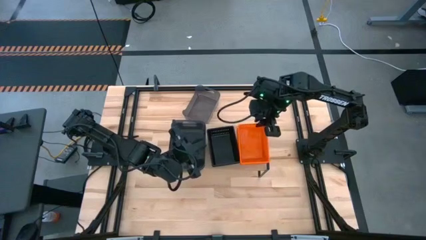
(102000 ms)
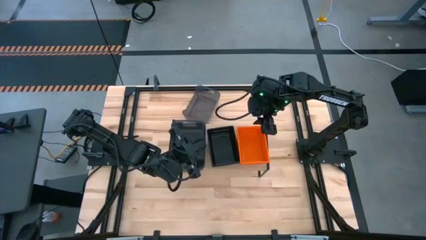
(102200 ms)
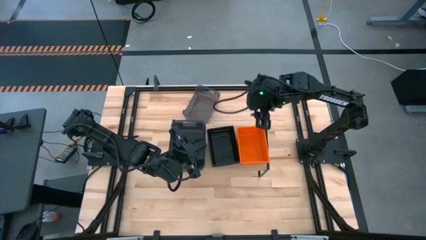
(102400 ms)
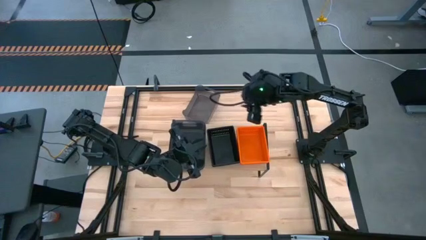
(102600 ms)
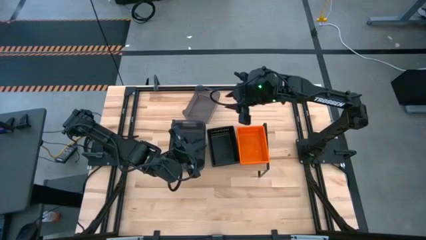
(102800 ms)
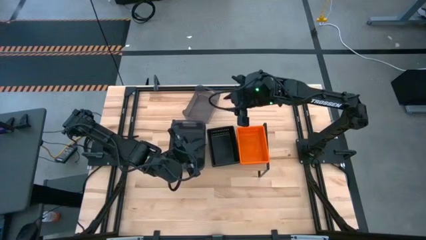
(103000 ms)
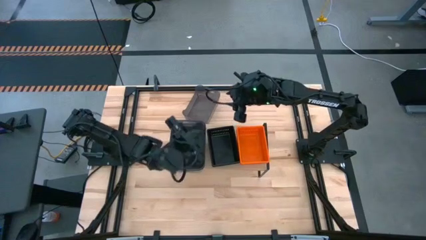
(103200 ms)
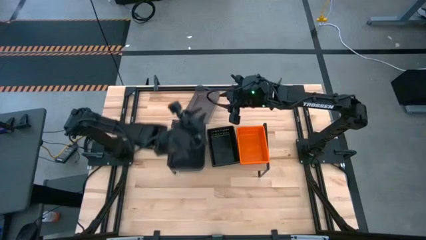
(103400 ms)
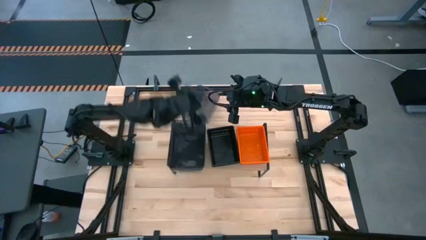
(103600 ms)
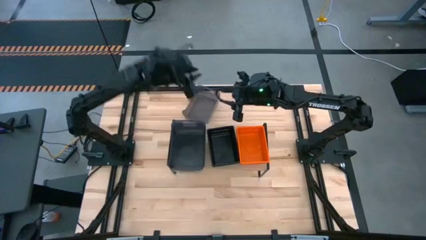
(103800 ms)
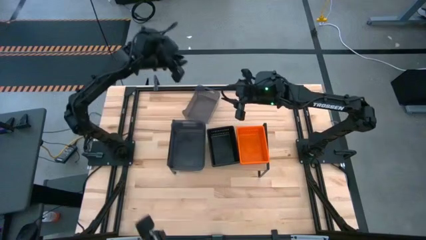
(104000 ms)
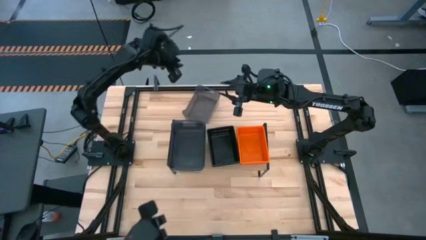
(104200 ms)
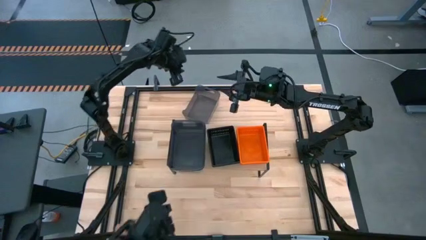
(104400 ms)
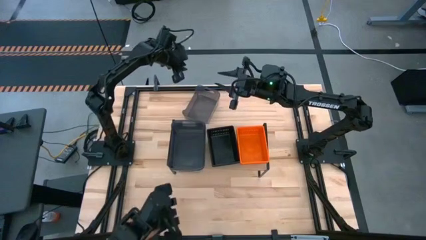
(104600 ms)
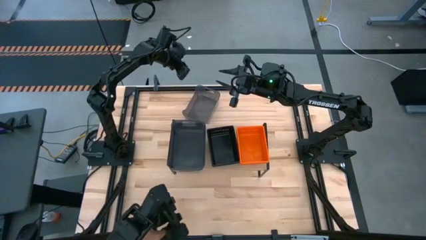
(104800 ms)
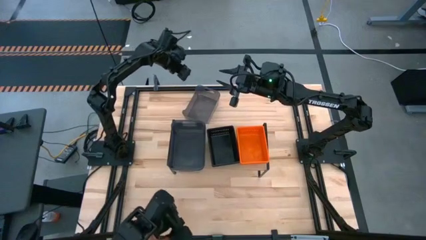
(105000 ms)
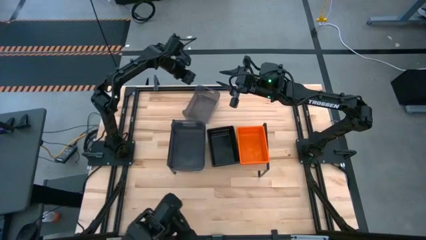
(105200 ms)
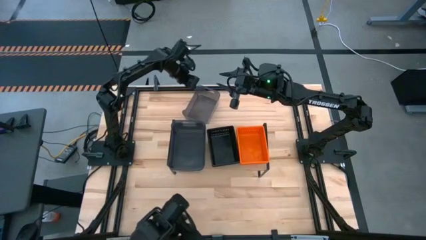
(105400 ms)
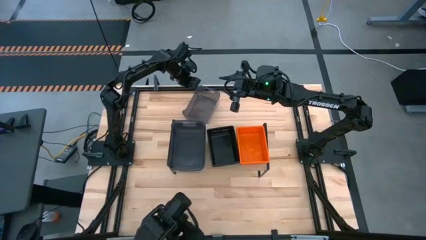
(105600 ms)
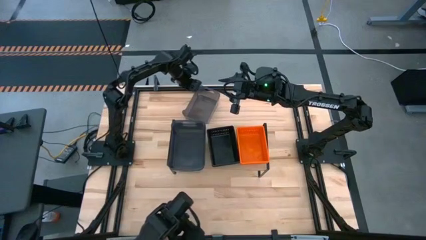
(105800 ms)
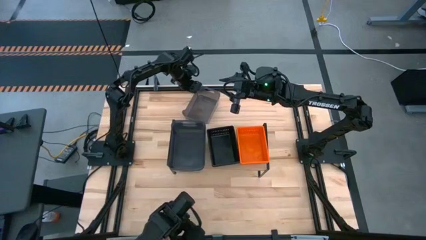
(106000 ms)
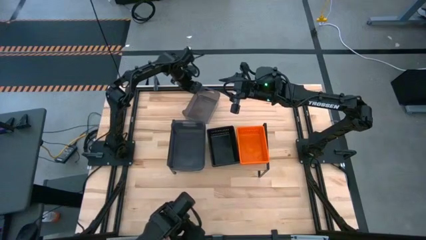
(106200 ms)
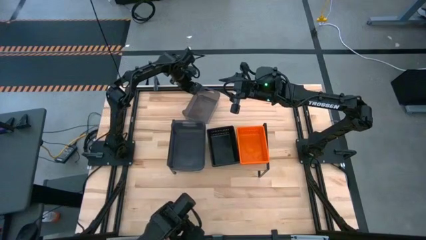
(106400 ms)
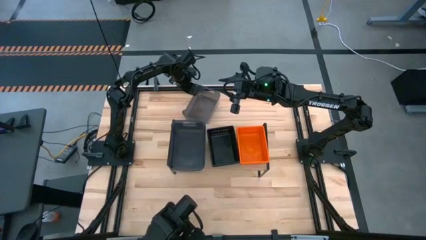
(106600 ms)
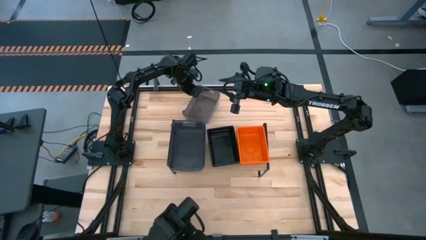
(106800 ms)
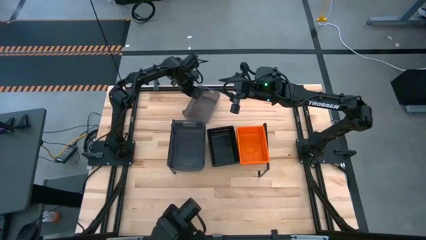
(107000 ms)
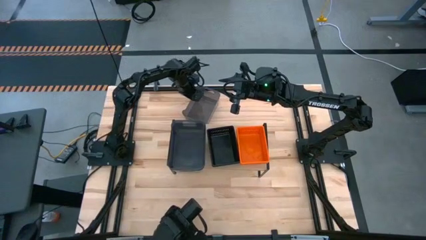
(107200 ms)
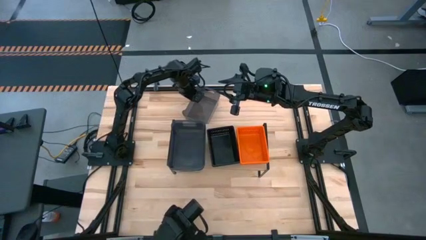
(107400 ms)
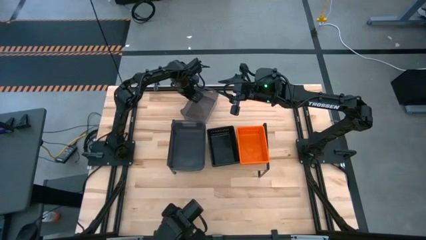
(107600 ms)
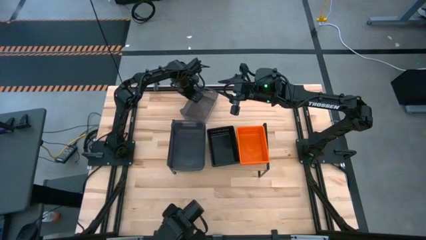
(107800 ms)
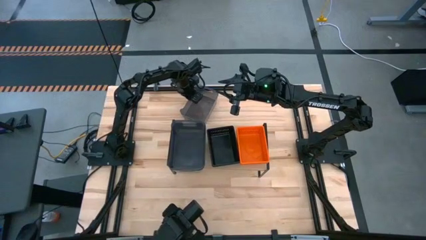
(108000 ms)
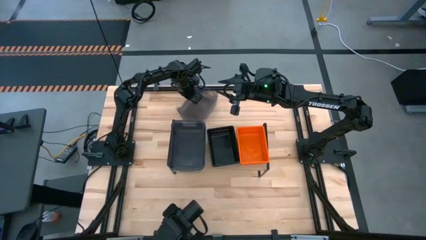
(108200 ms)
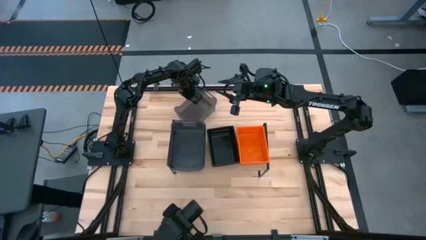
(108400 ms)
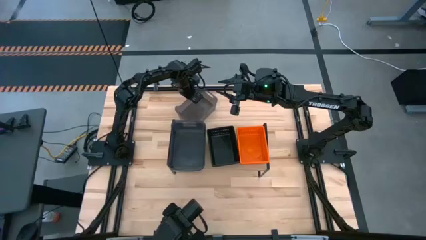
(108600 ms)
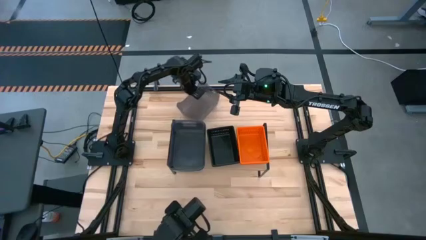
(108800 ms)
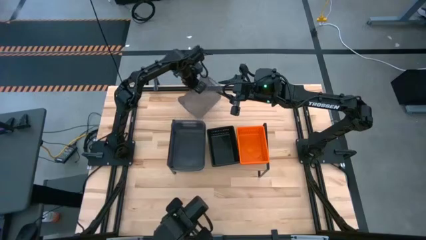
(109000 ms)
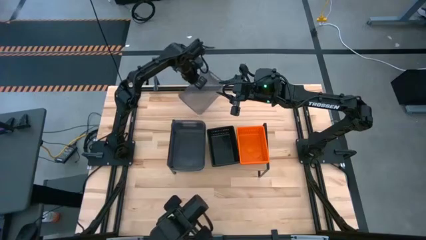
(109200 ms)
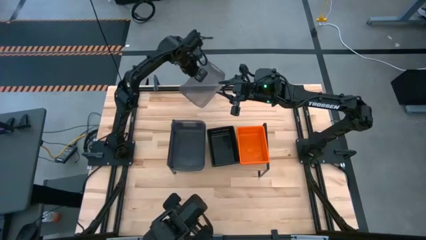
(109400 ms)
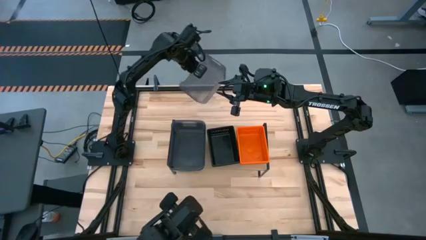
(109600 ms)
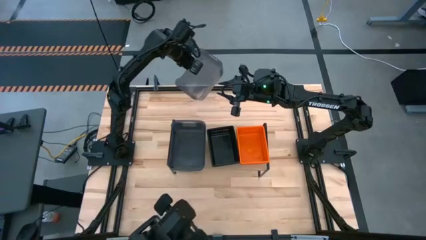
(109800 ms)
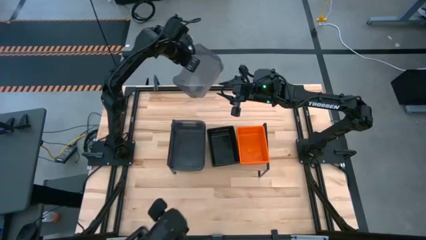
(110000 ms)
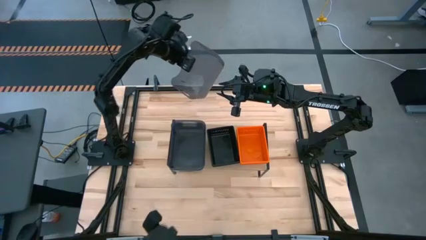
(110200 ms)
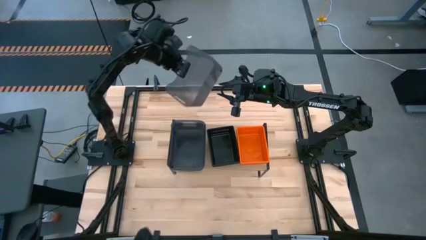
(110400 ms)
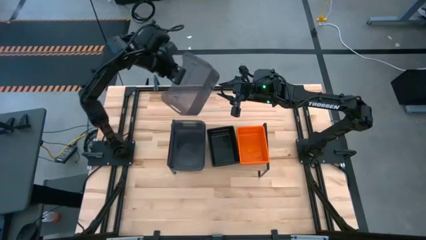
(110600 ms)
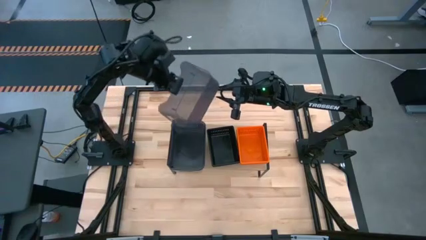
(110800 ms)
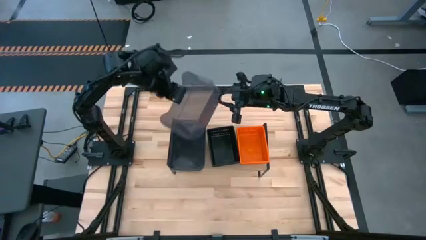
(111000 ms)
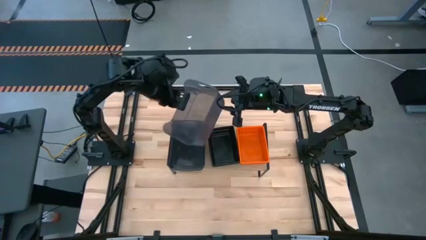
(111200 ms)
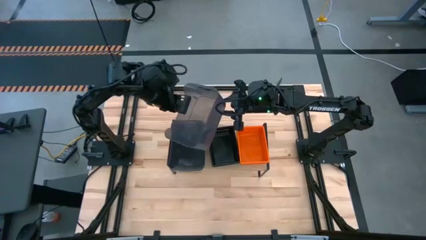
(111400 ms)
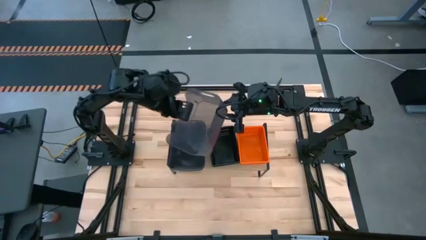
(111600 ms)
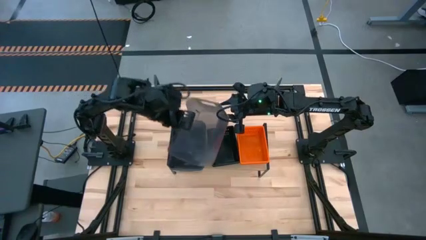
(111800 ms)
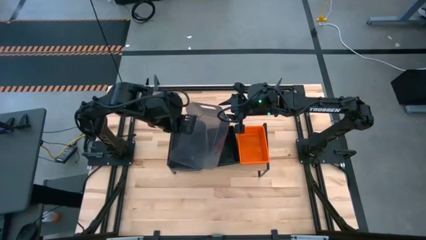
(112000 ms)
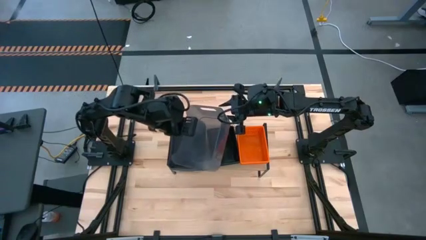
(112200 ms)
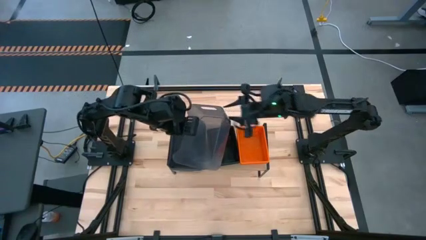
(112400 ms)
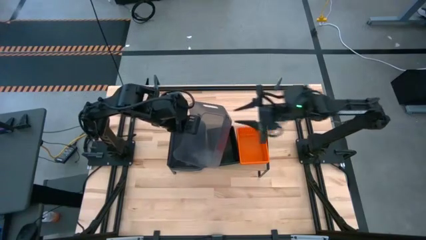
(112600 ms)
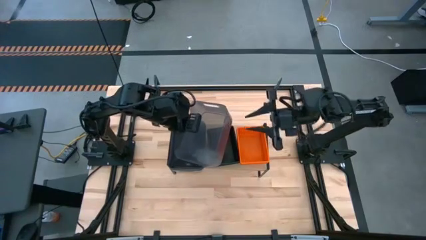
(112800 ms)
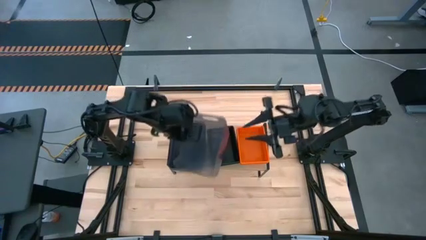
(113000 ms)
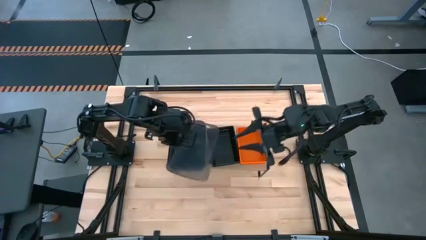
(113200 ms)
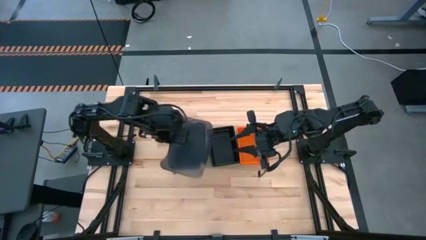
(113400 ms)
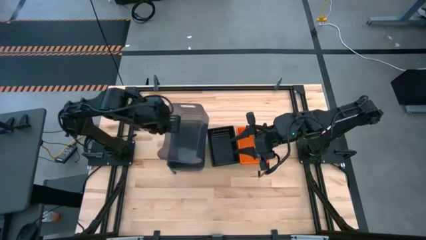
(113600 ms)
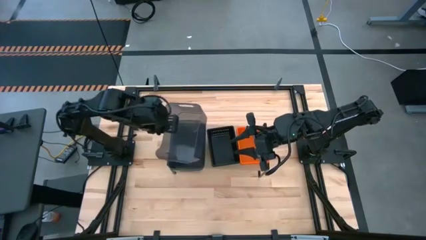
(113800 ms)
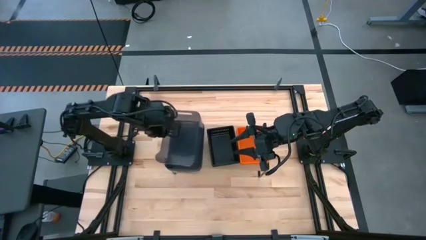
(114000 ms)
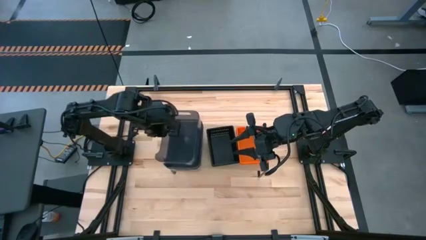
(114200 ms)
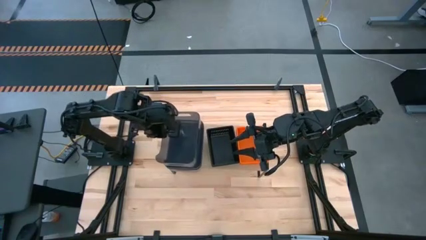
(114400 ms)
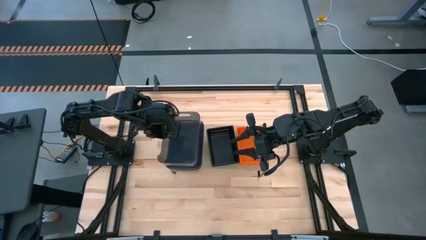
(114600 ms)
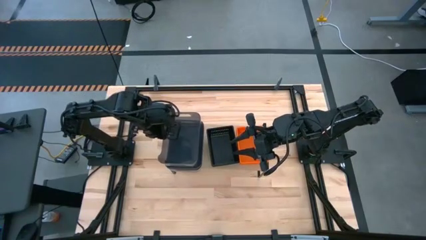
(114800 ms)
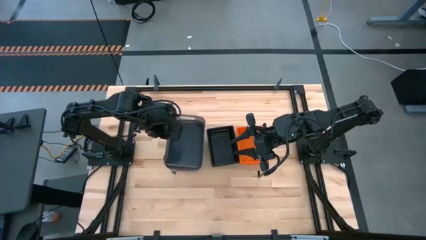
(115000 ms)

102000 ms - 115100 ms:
Task: Stack baskets on shelf by color
Stack the transparent black bin on top of the transparent black bins on the shelf

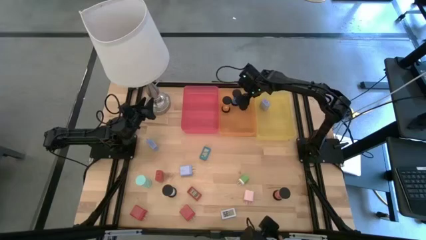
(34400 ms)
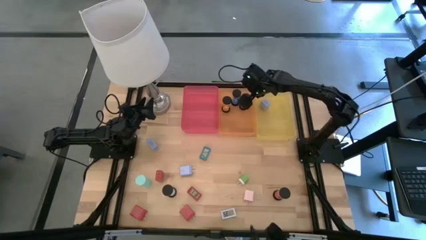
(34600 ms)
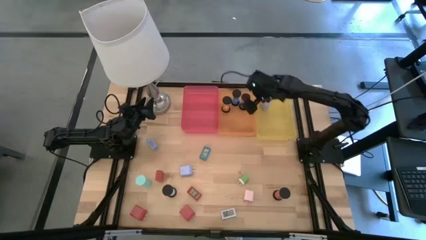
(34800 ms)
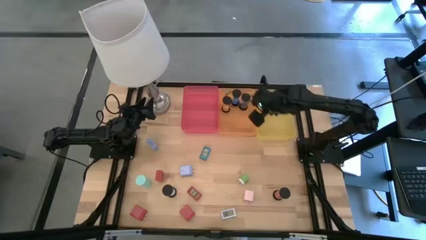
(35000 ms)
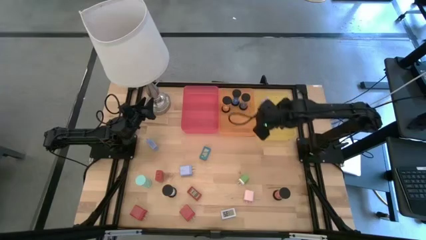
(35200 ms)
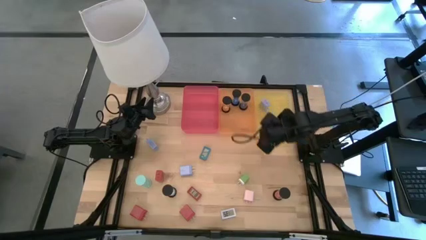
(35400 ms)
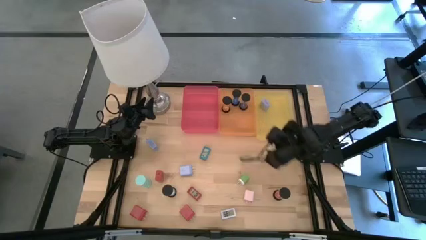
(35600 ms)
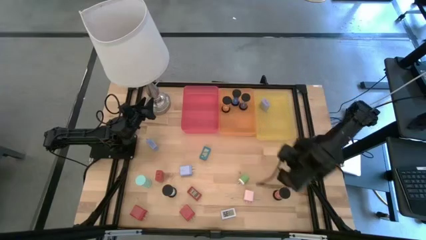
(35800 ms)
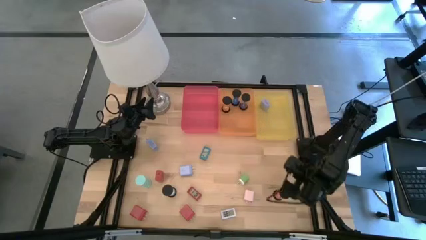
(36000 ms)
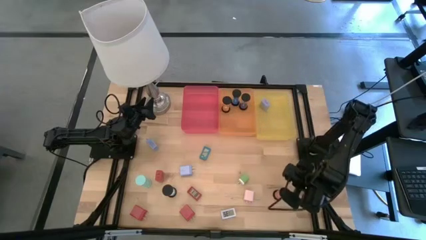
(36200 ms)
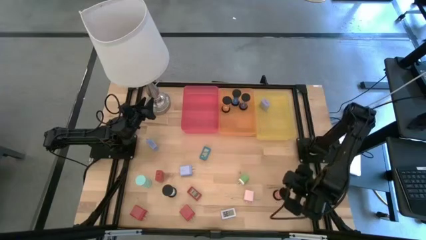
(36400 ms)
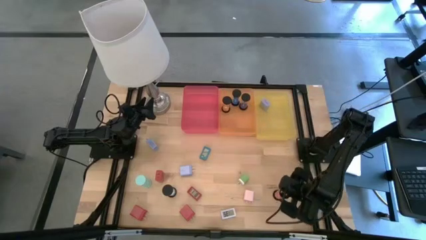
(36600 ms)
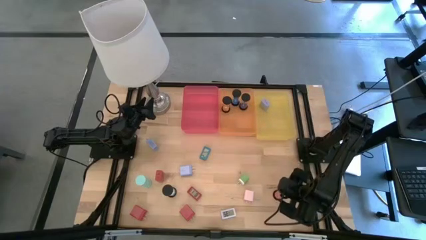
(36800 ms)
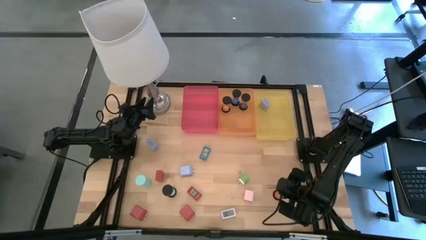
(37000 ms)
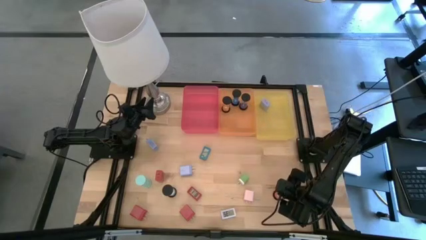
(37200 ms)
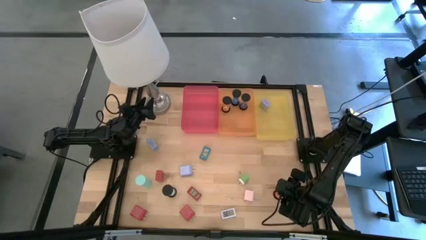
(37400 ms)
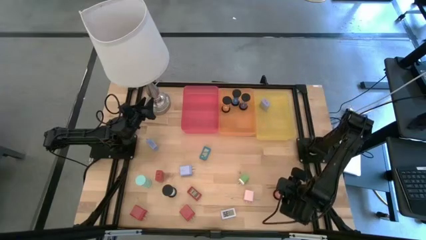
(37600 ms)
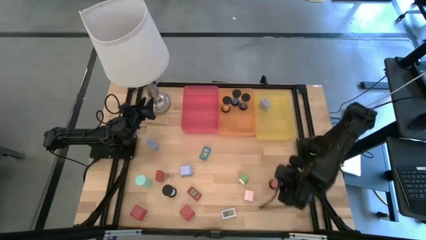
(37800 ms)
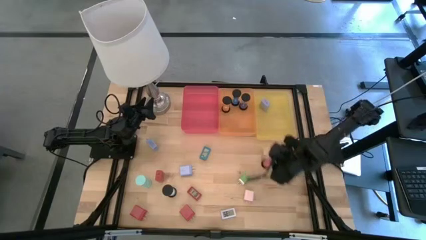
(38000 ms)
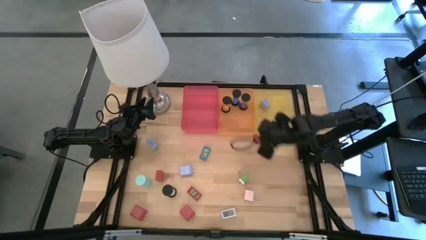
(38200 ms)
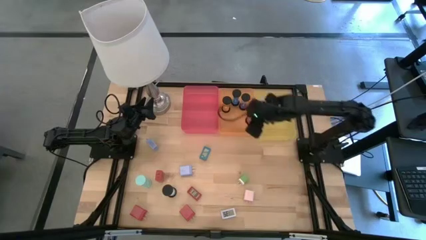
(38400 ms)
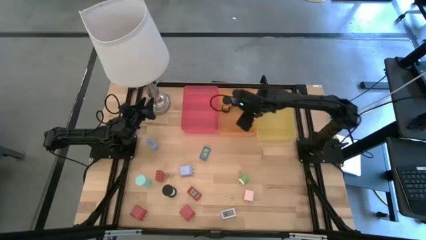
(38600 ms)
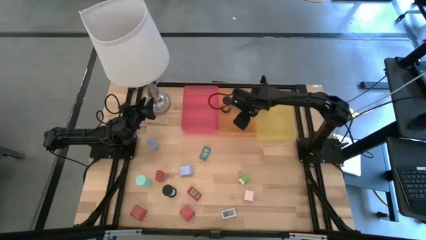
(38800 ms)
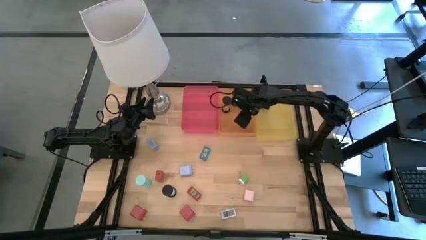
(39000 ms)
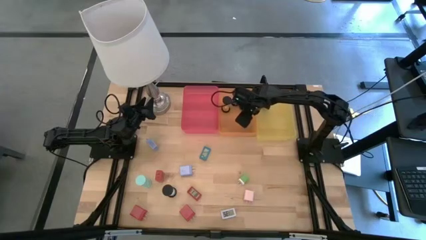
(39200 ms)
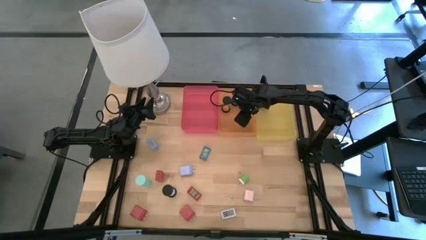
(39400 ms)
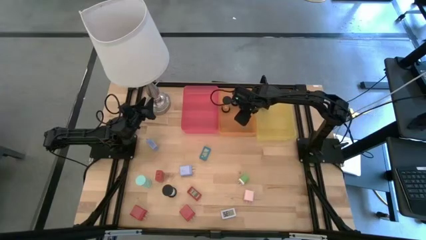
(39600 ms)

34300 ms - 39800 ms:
Task: Pick & Place Office items
Put the red hourglass into the orange bin
